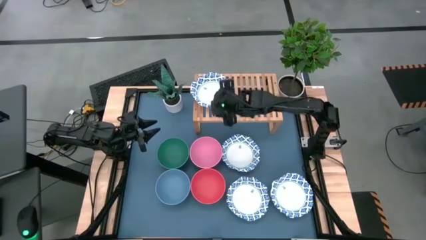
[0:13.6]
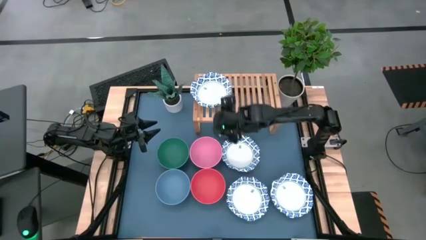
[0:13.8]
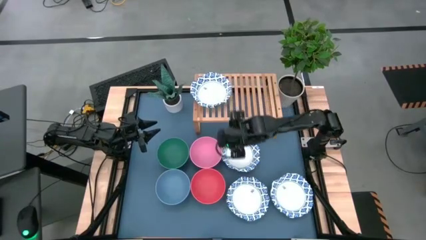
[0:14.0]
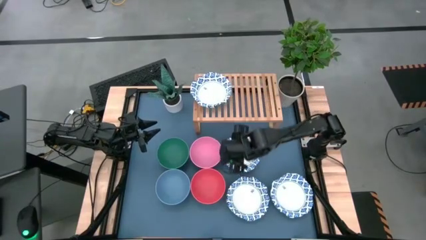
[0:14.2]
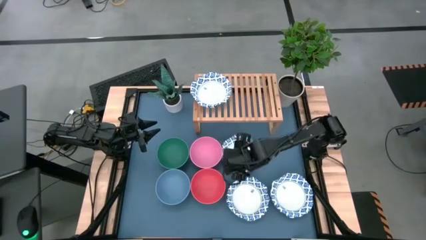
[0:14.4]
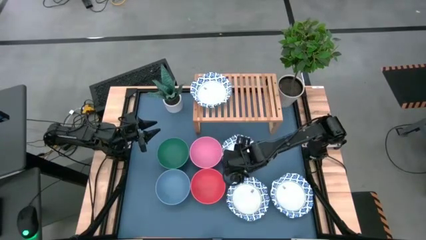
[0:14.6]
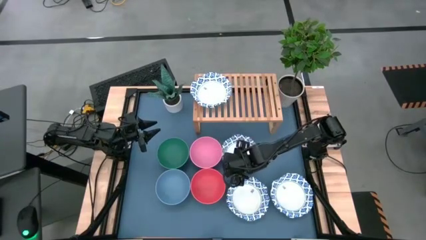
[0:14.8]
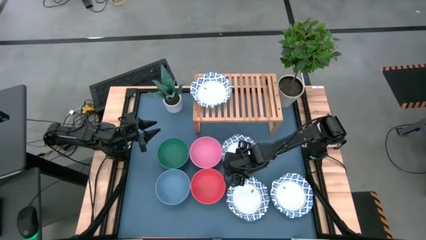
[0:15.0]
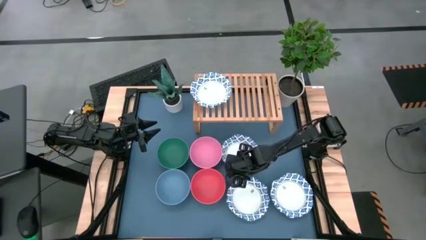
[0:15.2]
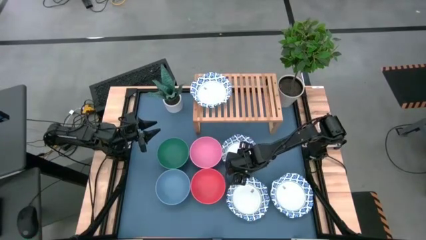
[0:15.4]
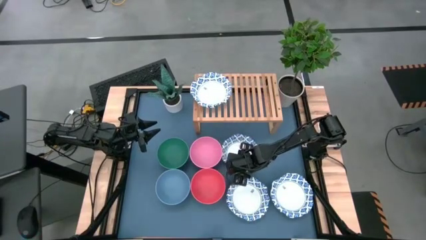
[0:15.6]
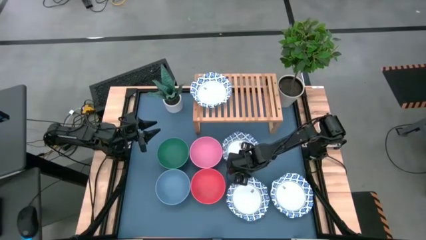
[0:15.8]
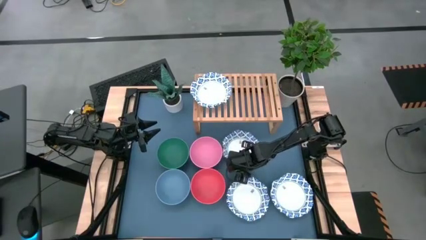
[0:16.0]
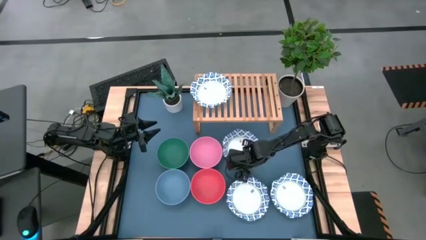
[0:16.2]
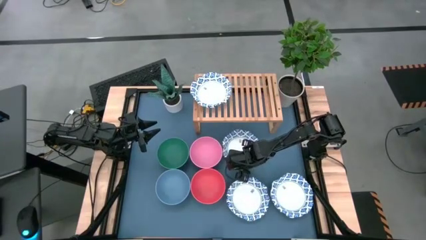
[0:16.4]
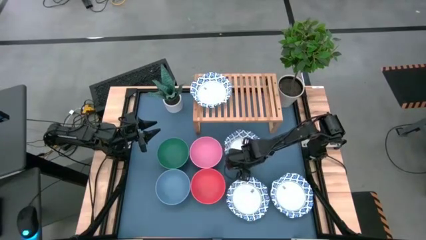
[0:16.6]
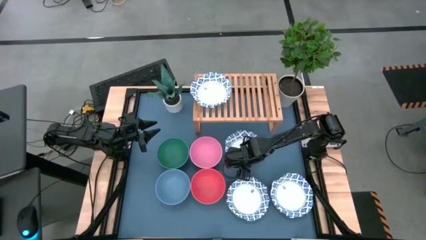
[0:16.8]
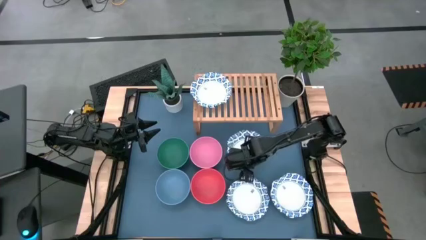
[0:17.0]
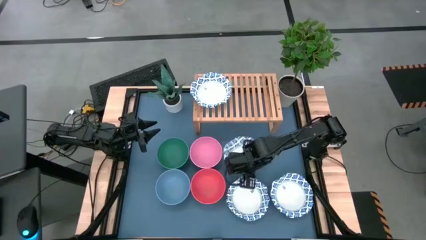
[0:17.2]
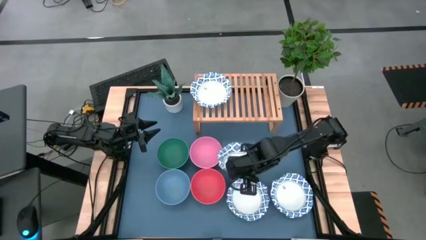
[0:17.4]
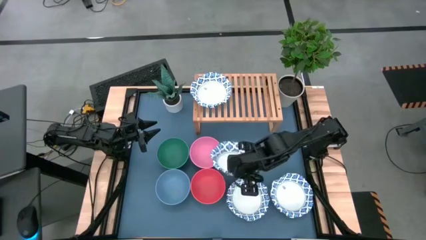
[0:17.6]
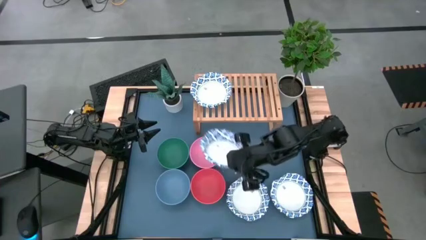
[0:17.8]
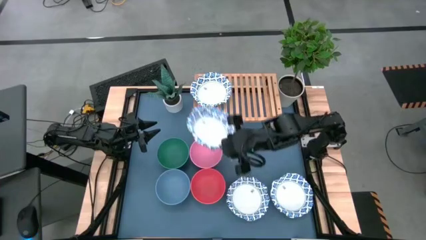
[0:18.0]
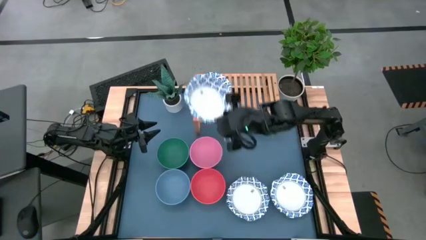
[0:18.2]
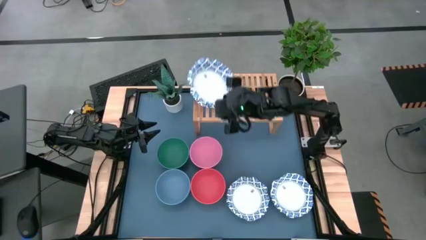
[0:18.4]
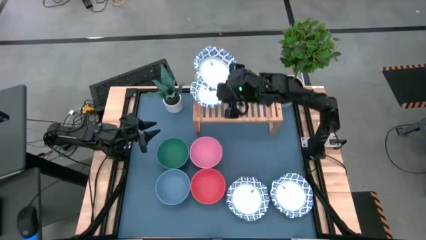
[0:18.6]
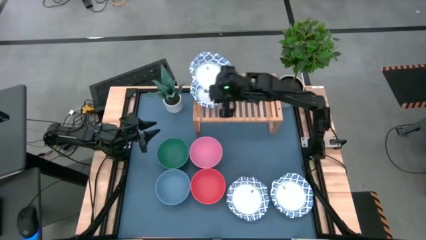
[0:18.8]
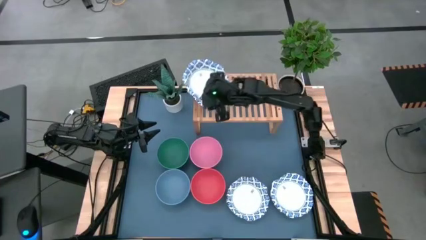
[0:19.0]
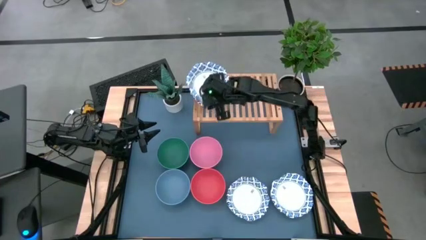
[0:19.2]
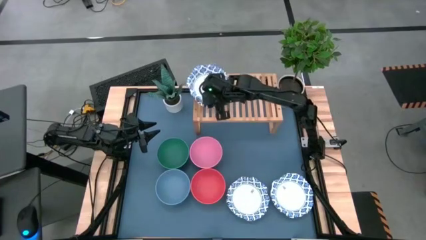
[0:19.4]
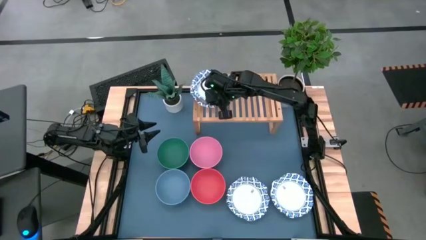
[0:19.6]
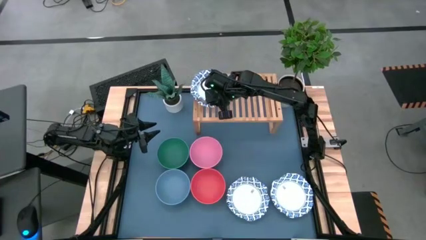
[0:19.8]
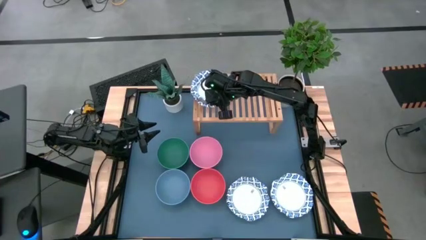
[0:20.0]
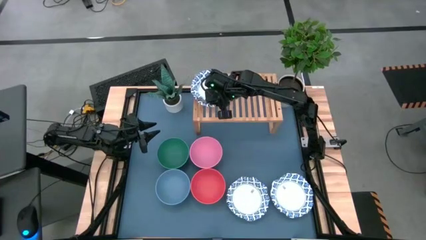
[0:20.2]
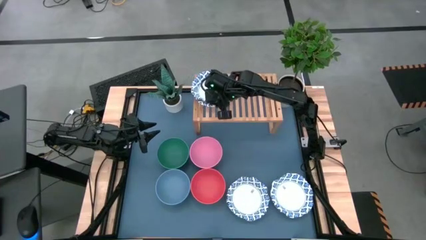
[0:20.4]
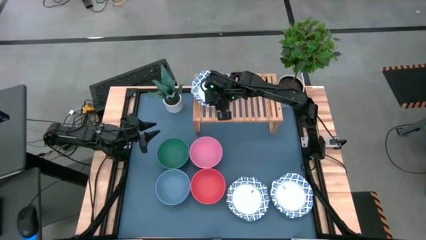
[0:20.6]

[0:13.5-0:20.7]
Task: Place and stack bowls onto a shelf
Stack the white patterned bowl on top of the white patterned bowl on the shelf

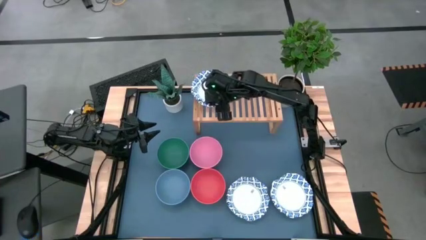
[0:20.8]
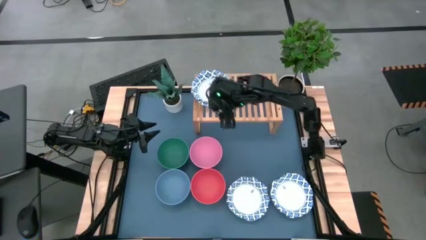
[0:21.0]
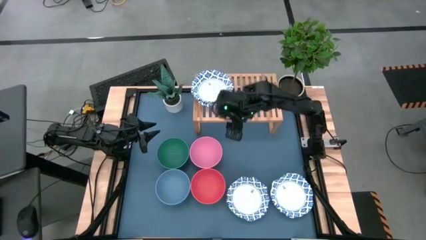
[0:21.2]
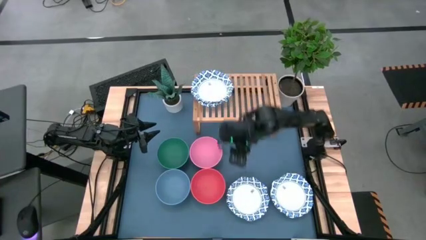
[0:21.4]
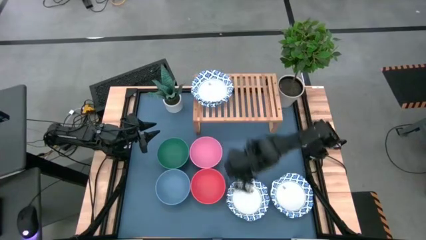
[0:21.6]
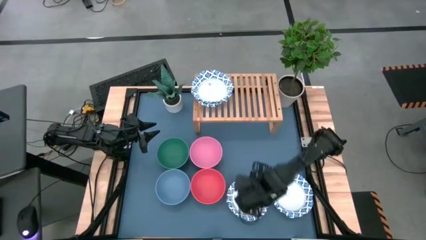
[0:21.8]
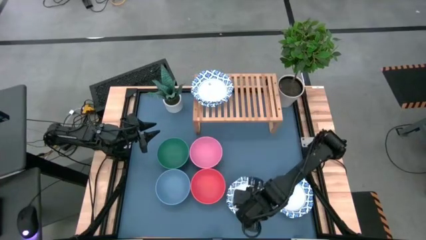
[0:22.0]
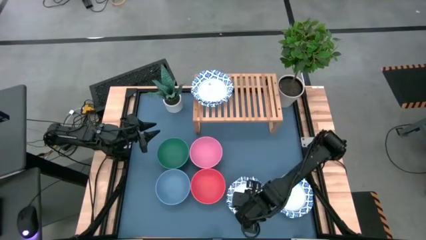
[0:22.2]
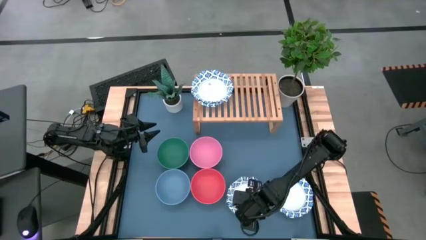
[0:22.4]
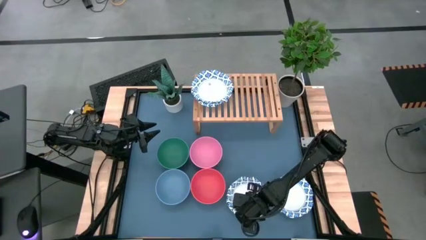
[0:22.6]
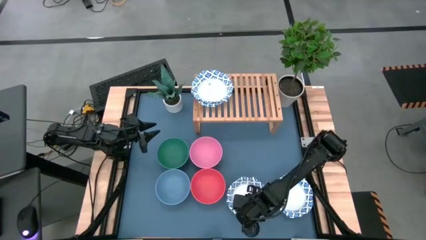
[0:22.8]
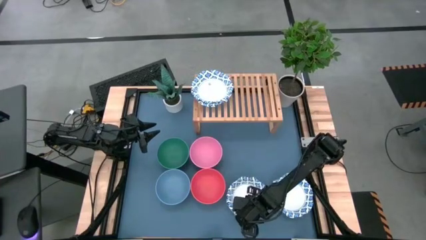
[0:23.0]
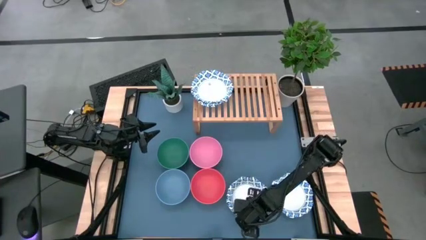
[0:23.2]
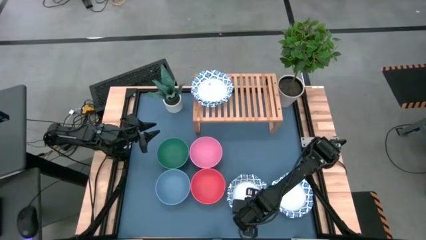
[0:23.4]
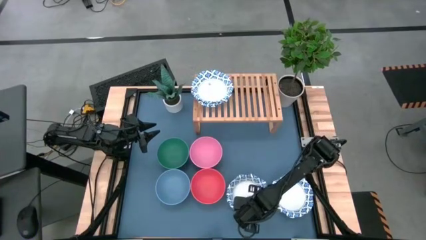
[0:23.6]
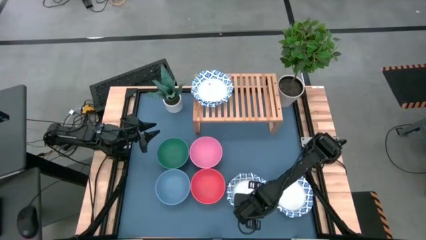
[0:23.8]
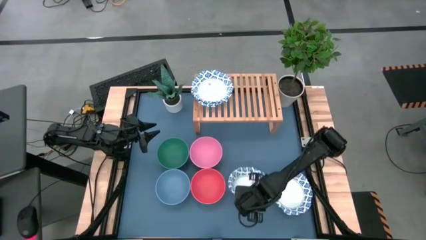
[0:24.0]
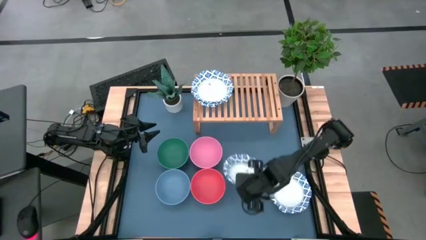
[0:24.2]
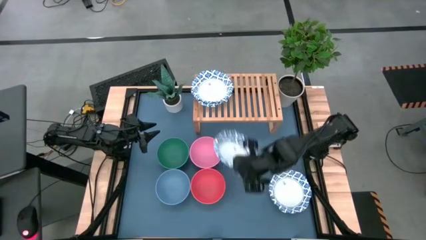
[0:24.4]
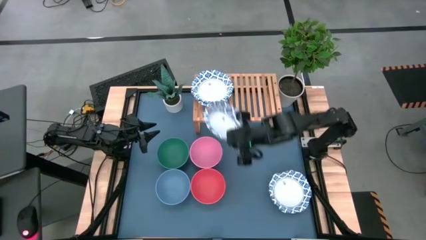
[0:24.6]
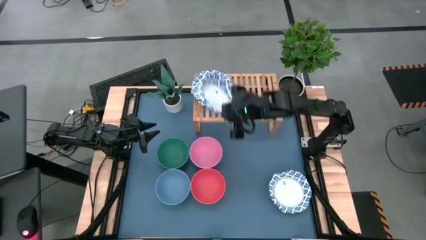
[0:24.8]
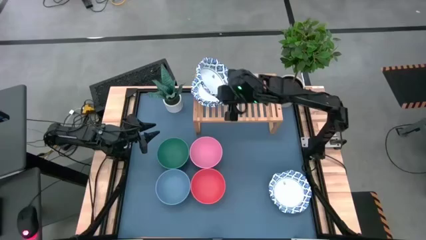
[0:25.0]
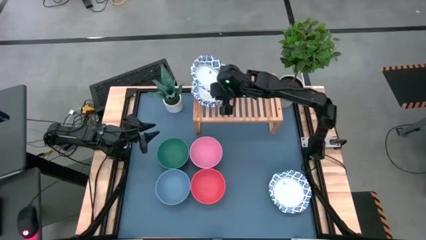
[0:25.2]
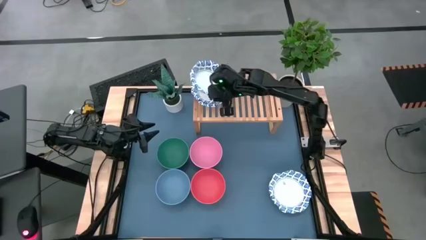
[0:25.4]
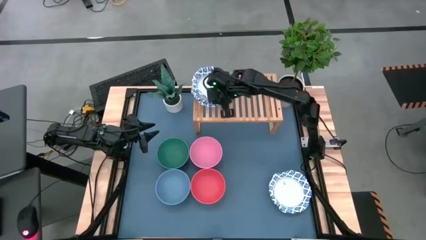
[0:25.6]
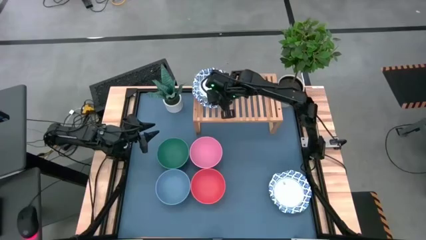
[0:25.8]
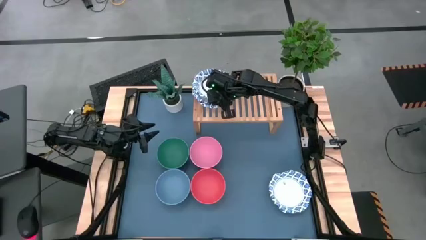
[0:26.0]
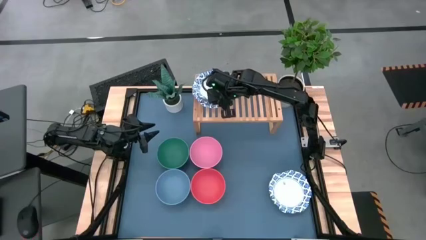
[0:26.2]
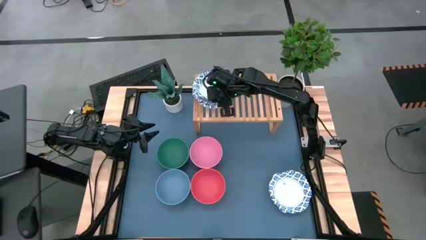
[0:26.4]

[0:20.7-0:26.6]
Stack the white patterned bowl on top of the white patterned bowl on the shelf

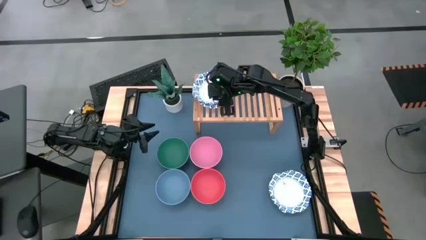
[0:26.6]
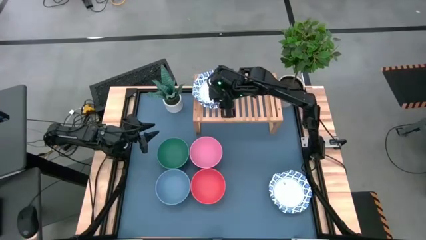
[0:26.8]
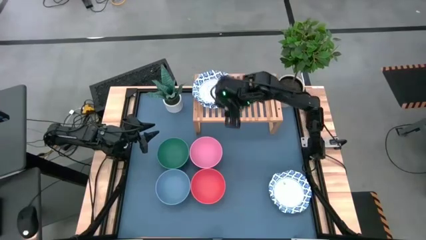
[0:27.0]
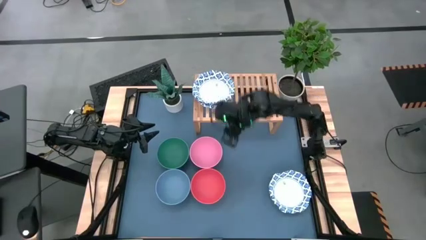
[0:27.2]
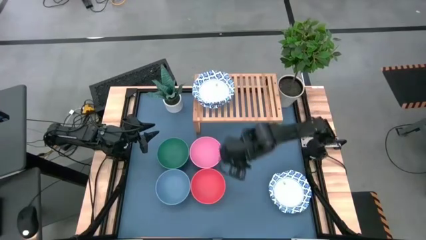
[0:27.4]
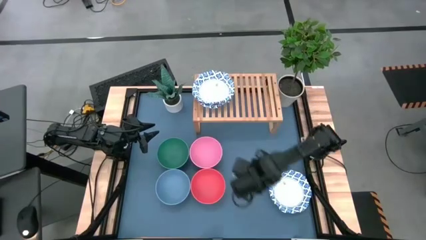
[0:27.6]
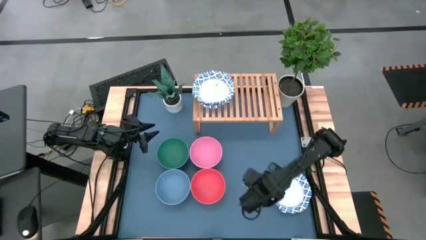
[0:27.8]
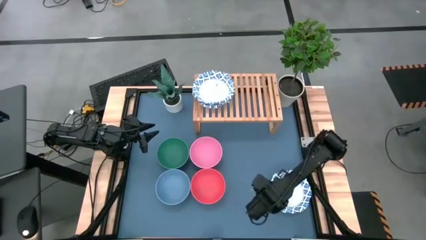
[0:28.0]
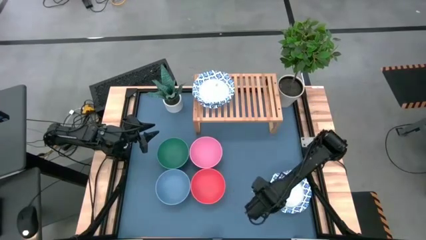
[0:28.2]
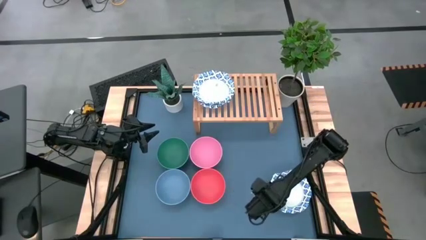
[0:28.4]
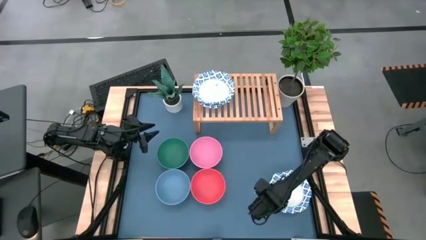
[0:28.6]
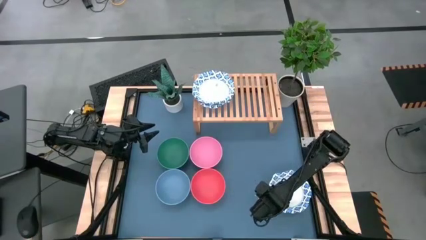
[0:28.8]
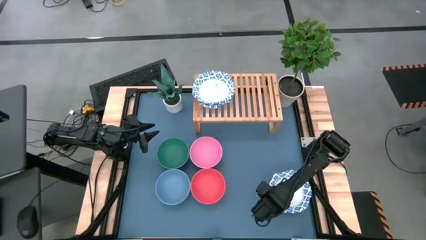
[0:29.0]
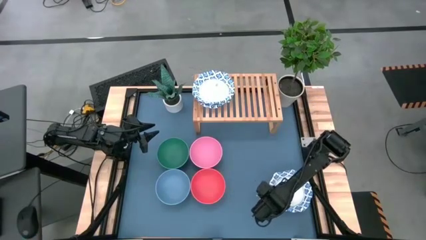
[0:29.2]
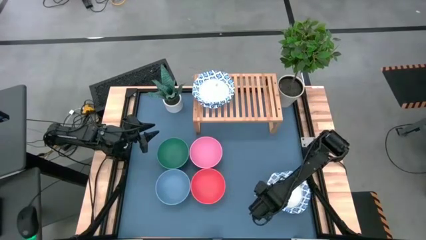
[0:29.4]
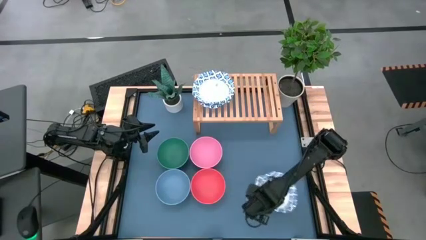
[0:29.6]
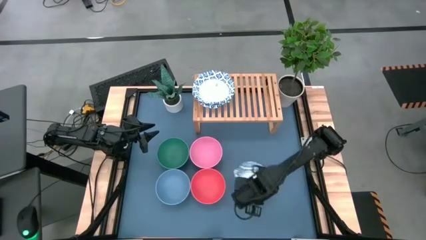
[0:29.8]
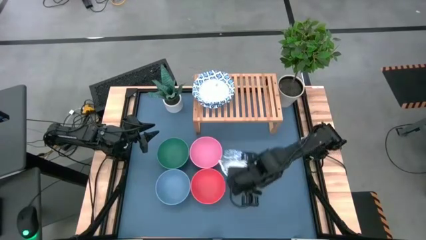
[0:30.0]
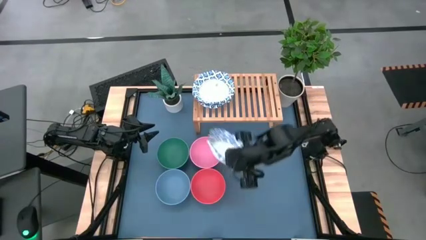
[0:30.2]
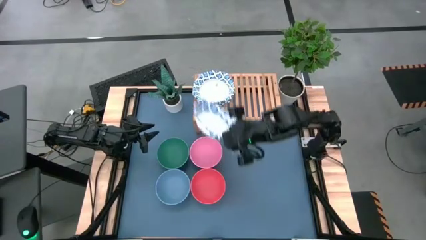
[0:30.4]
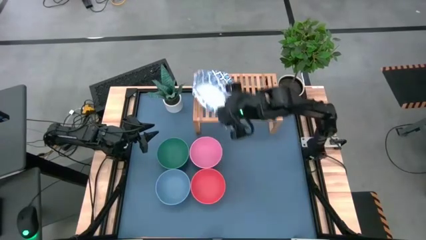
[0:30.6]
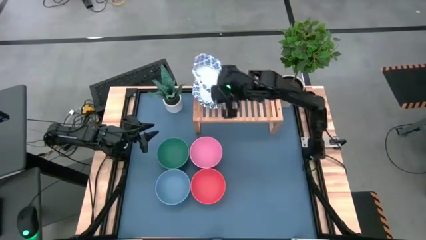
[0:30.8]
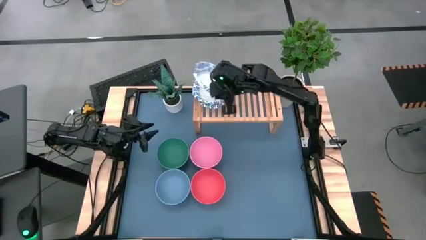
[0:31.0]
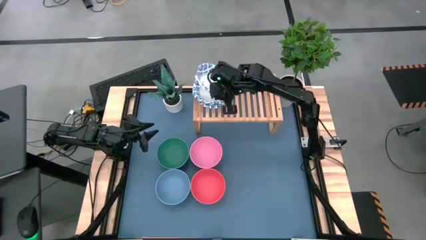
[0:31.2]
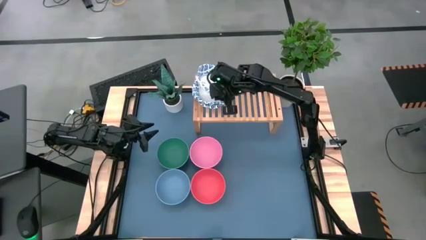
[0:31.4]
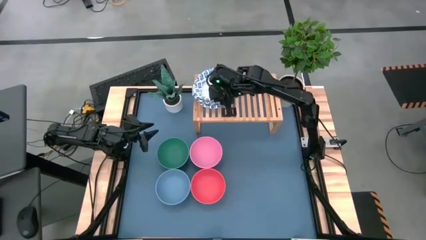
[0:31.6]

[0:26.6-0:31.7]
Stack the white patterned bowl on top of the white patterned bowl on the shelf
